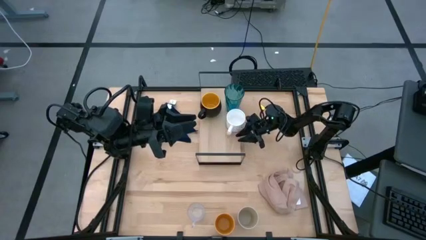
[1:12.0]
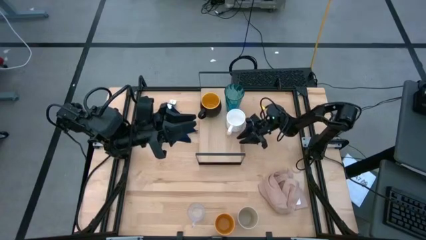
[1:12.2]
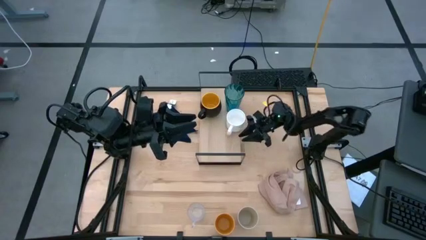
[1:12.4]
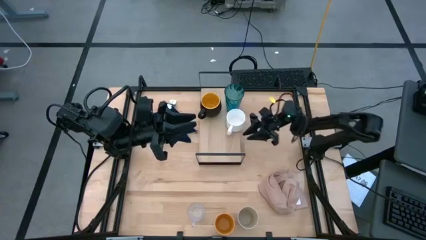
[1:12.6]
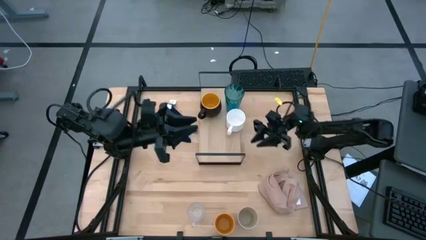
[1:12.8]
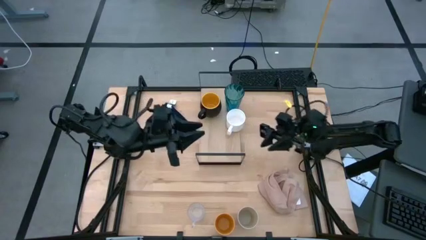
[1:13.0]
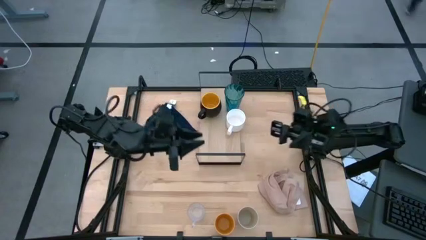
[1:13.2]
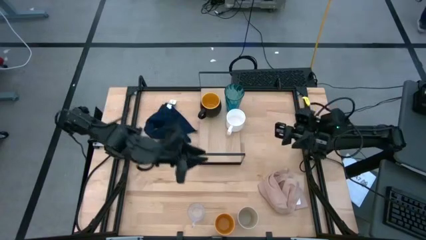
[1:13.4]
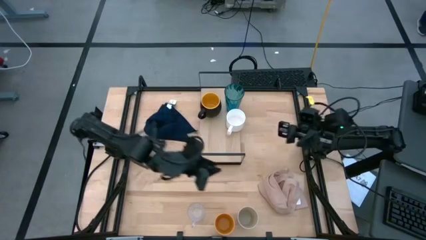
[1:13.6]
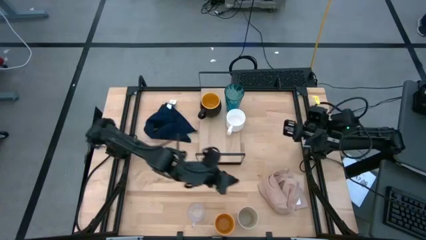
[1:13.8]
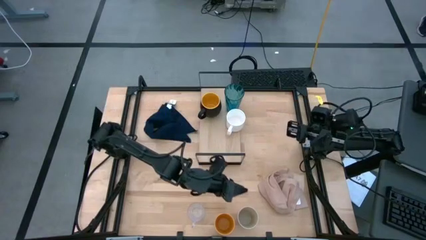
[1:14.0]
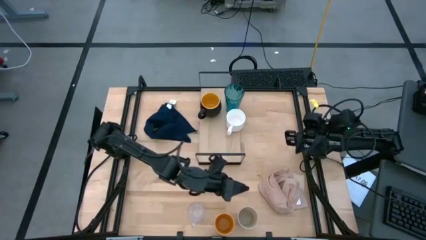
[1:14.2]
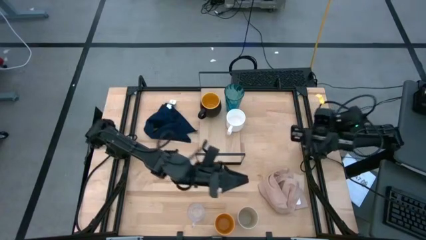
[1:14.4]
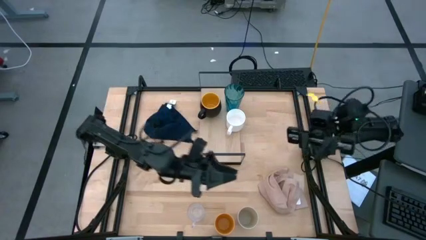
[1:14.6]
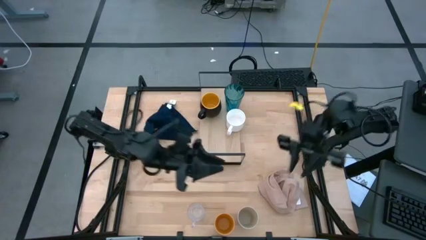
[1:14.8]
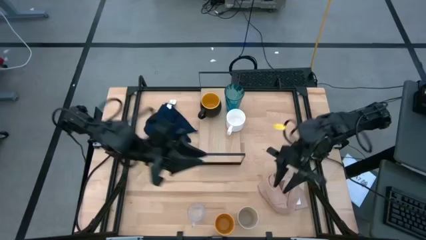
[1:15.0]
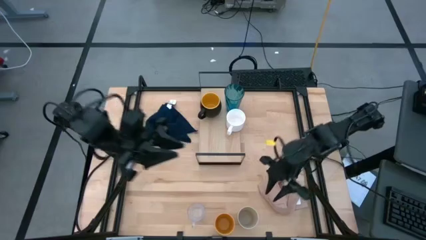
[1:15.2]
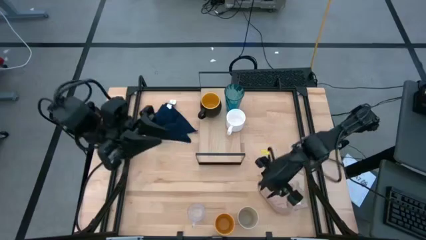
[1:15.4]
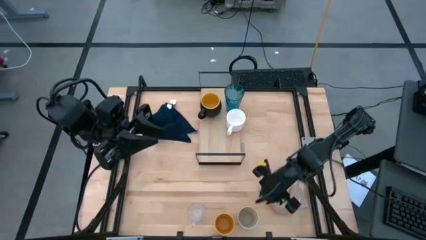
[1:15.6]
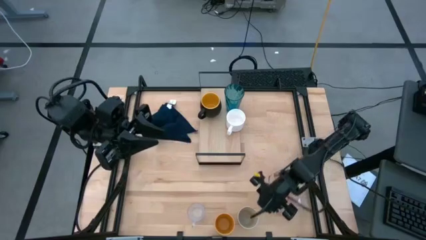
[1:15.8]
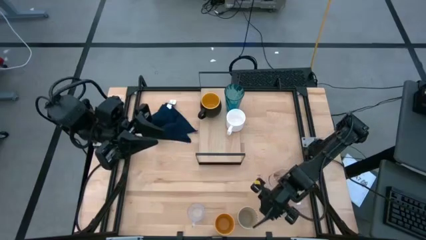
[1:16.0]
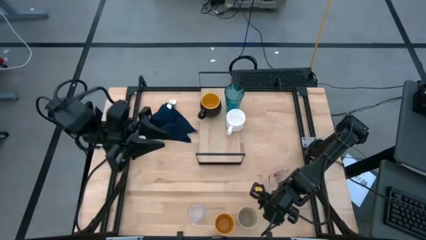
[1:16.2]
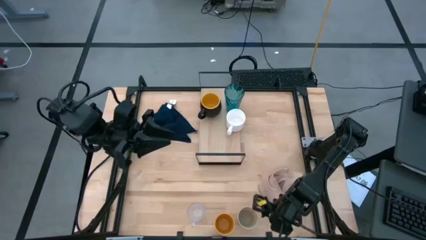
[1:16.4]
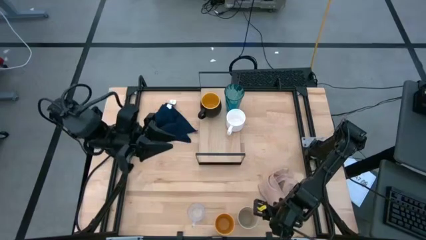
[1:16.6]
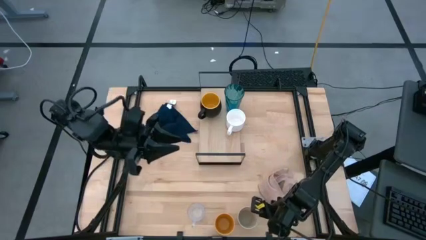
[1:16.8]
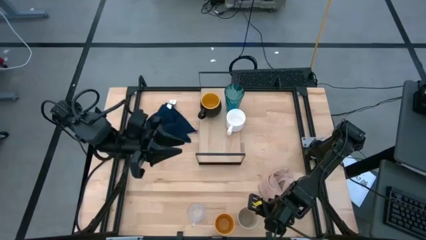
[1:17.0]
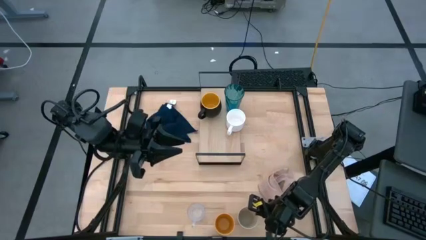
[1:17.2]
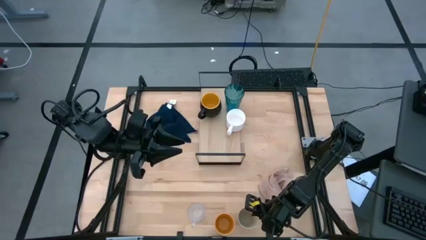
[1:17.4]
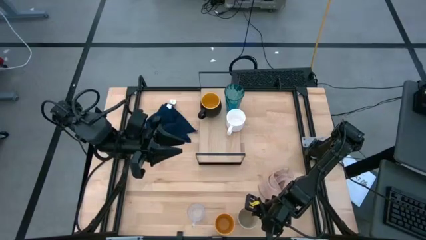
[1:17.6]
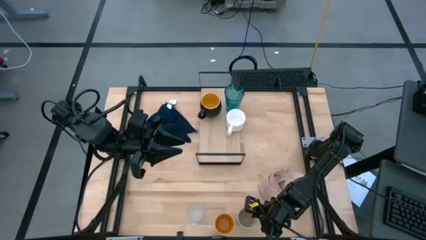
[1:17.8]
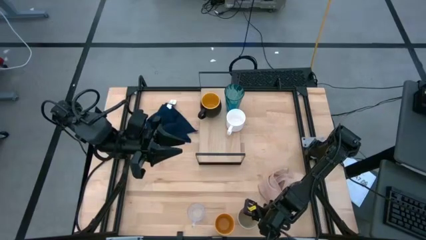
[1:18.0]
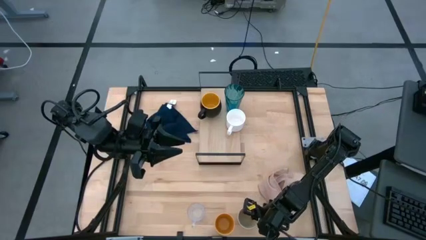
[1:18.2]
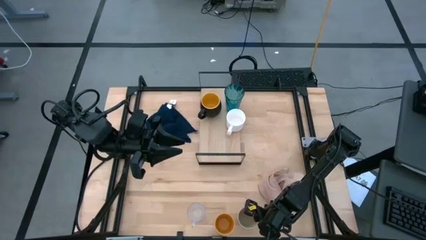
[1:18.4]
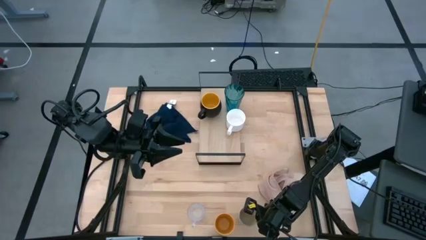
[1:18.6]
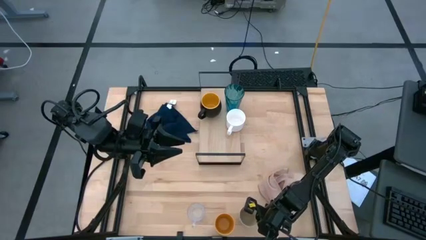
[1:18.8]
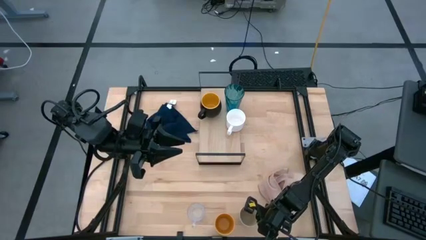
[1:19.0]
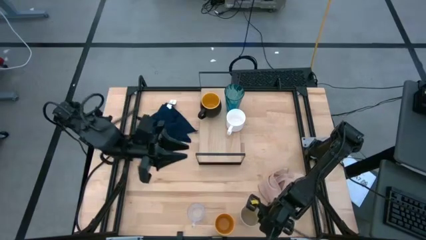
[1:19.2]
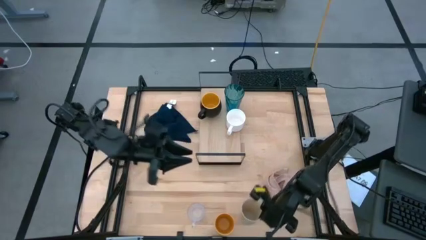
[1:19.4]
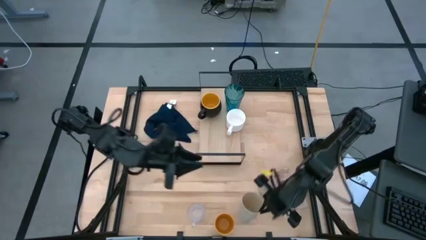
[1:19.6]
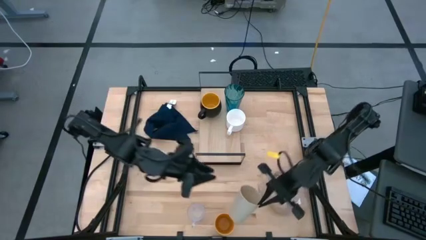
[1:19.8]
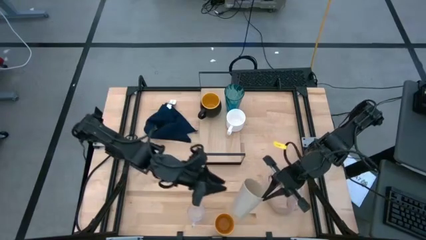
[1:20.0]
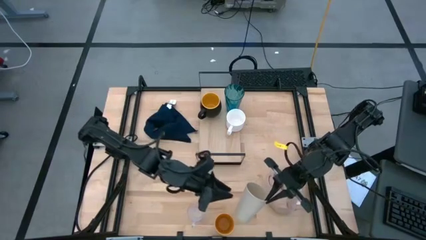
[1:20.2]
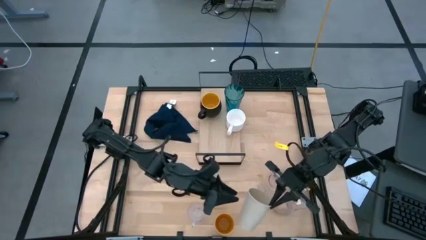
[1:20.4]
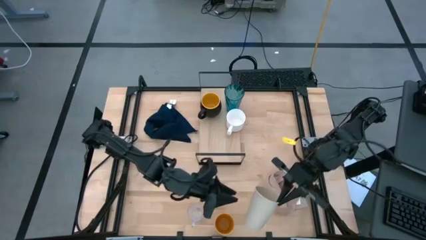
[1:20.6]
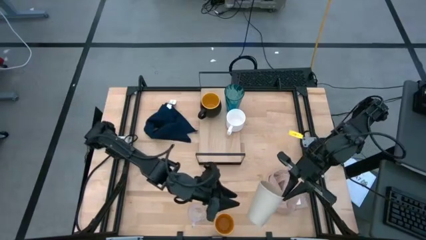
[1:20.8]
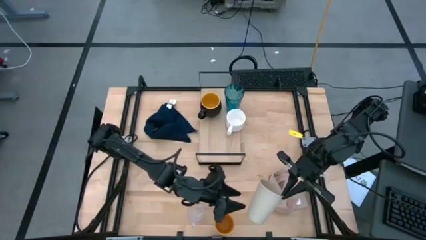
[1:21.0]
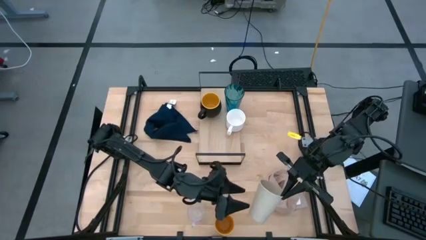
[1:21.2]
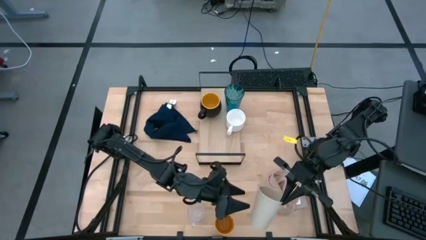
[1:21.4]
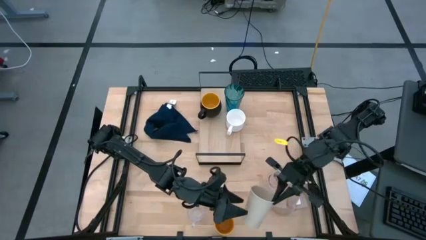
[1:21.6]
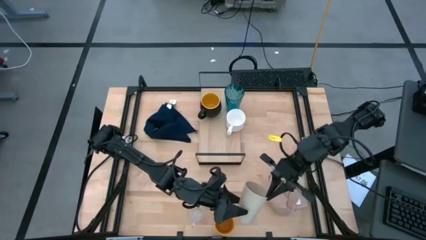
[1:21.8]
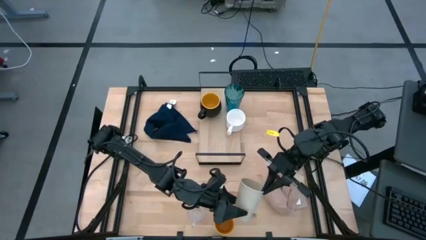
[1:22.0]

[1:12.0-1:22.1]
Task: Stack small to large cups/mugs on shelf
Put the brown cup on the shelf

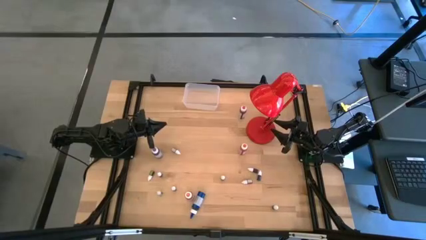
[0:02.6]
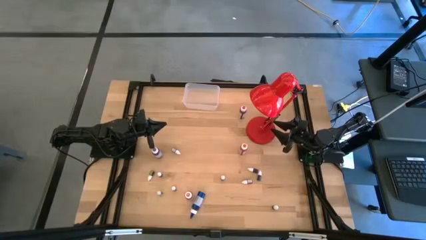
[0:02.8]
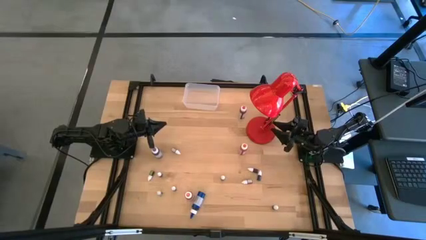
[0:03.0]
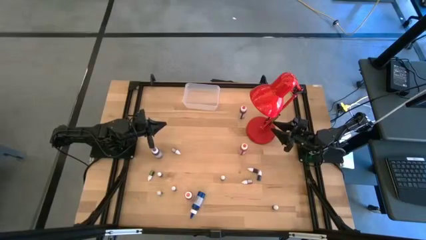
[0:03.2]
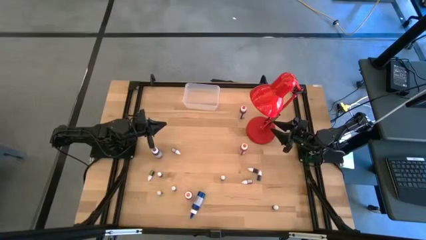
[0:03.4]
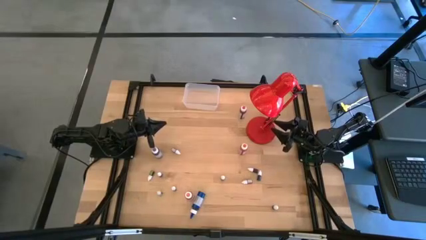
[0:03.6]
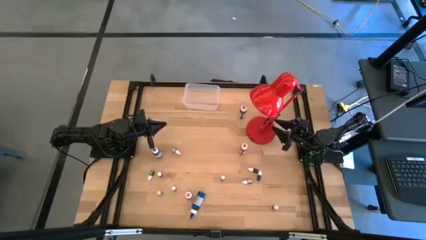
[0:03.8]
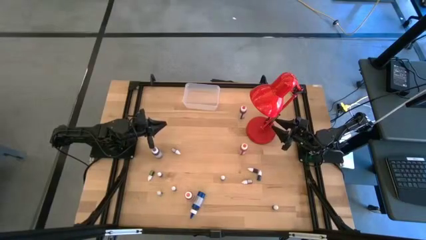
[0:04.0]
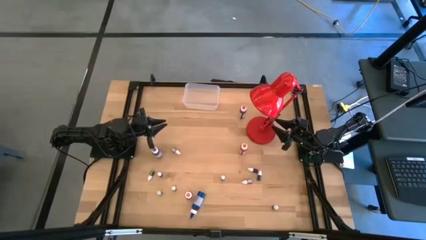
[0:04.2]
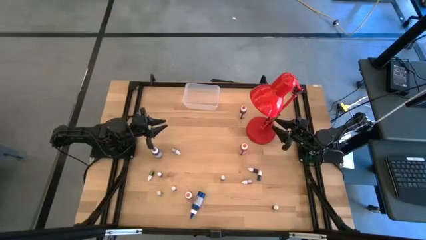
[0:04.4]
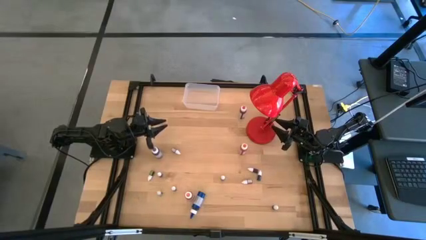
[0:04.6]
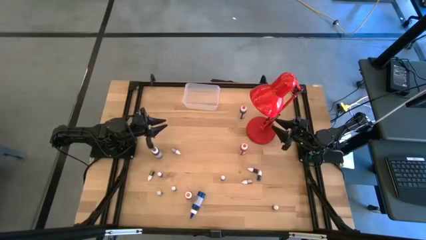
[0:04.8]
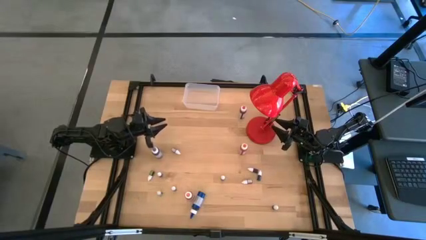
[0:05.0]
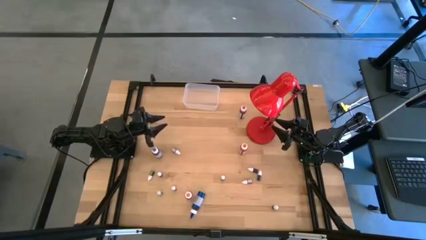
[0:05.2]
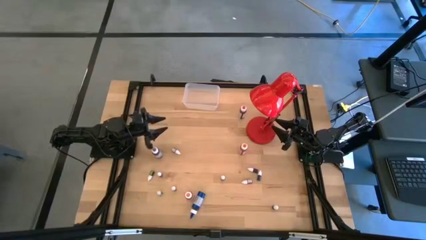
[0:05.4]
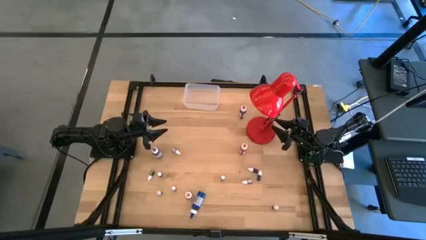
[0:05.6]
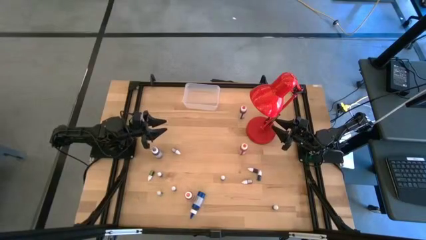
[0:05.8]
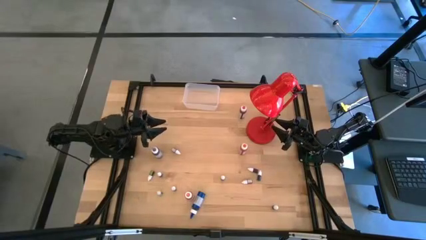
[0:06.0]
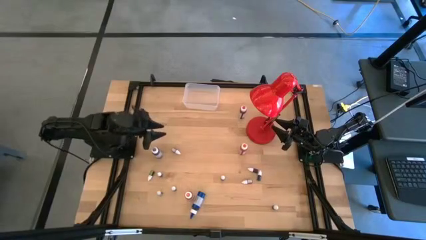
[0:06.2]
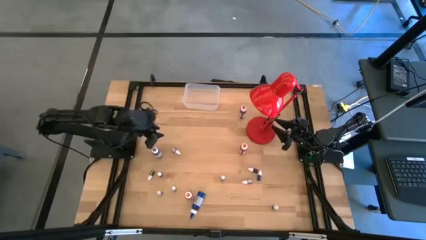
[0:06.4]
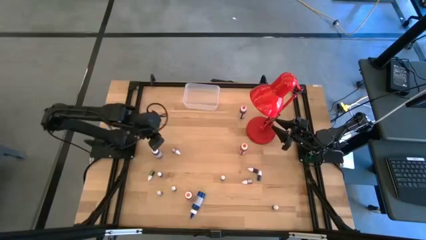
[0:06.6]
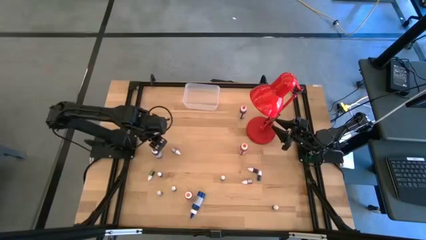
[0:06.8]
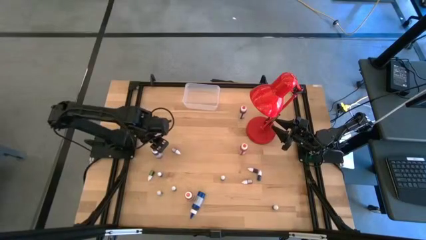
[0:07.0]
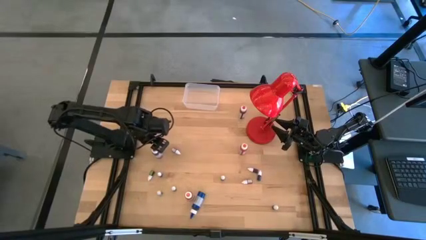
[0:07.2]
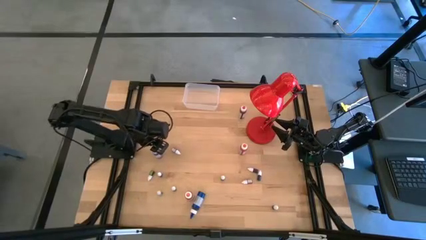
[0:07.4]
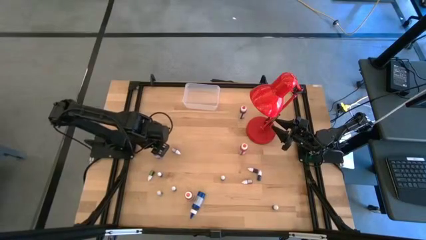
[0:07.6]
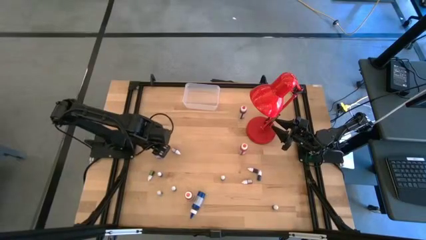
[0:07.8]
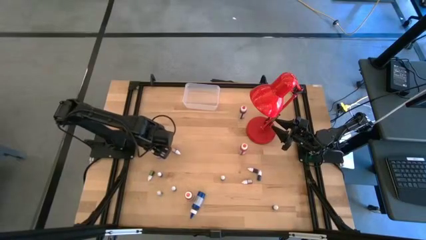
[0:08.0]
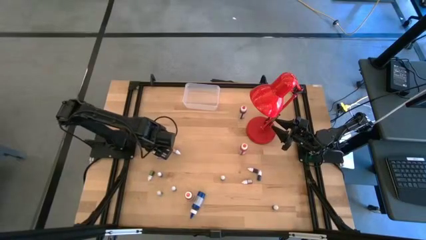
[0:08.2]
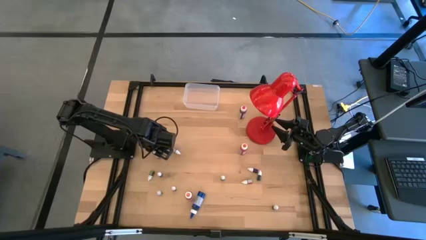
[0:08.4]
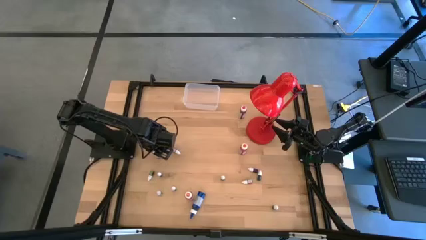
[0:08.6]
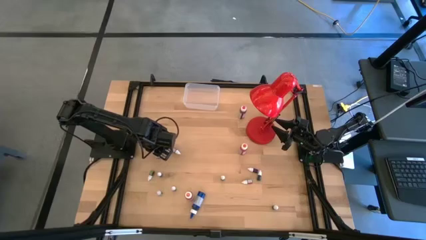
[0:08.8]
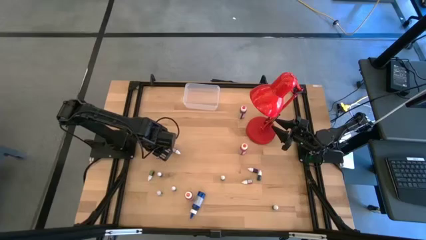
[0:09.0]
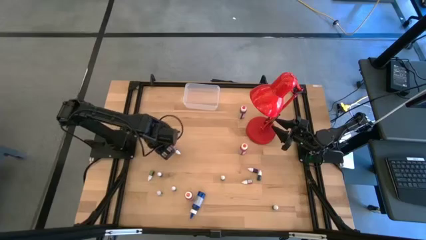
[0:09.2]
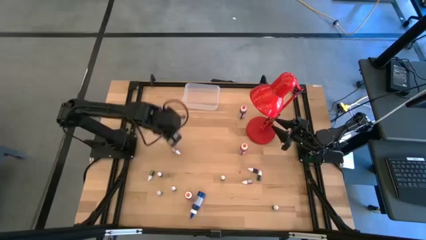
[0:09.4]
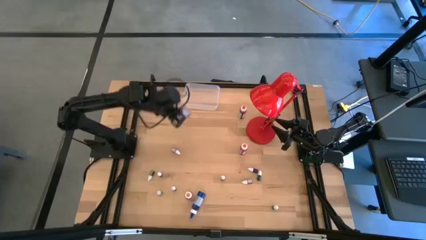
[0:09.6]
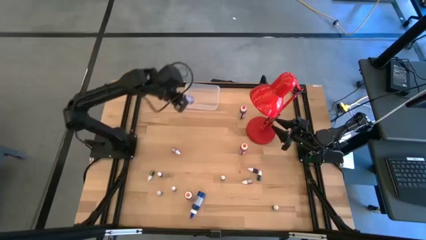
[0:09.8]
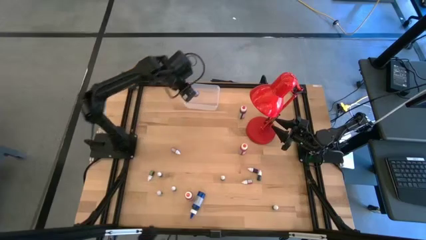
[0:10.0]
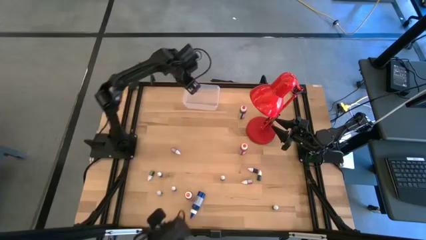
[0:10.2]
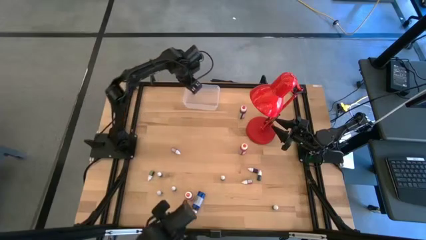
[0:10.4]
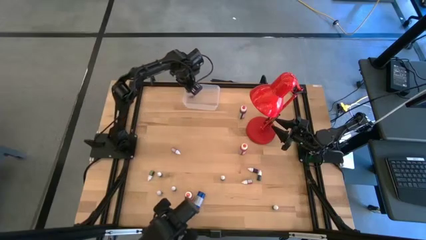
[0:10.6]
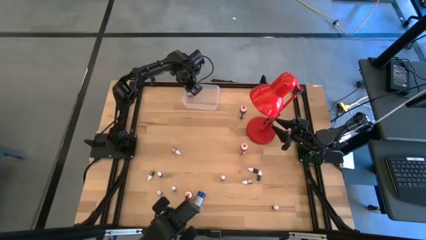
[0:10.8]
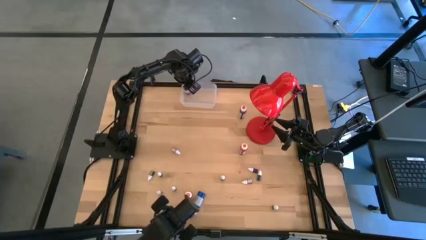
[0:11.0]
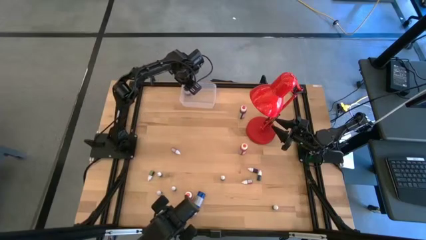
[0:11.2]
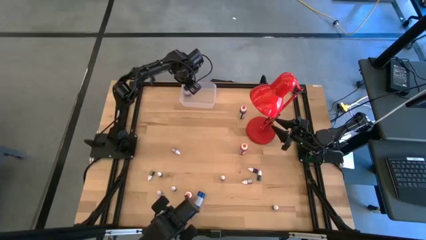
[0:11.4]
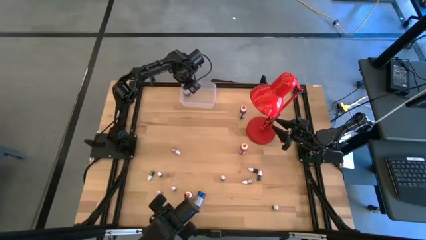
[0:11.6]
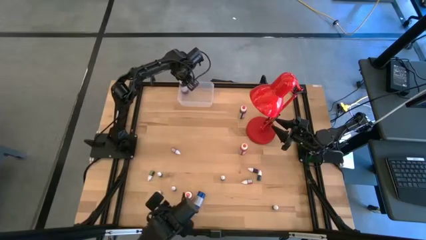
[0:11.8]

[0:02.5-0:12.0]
Task: Pick & Place food coloring
Put the large purple food coloring bottle into the transparent bin
